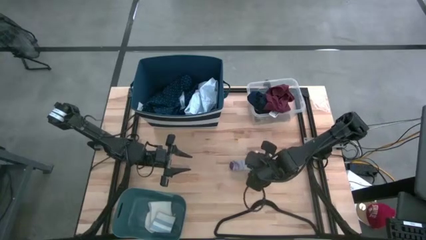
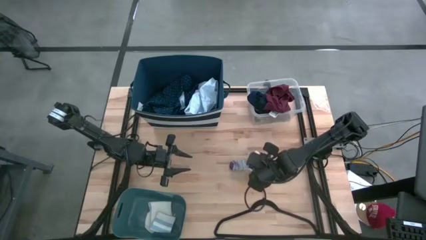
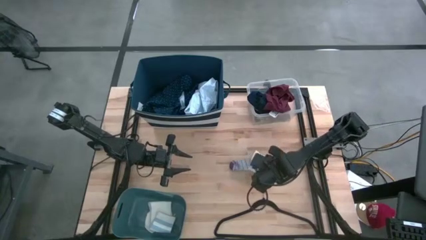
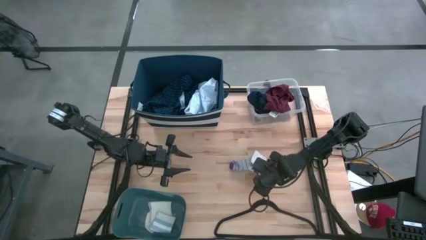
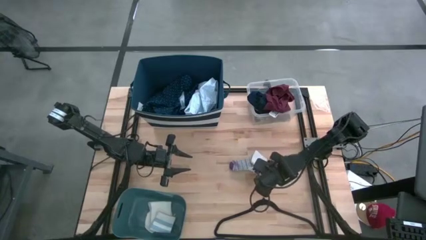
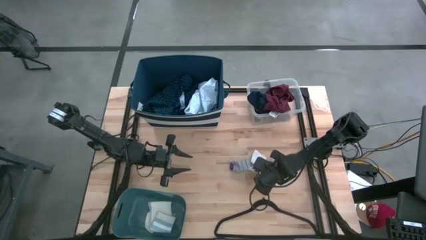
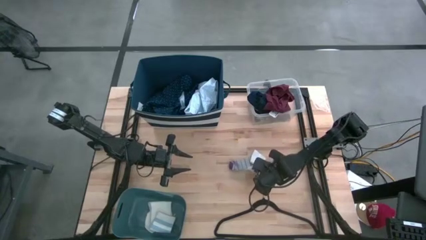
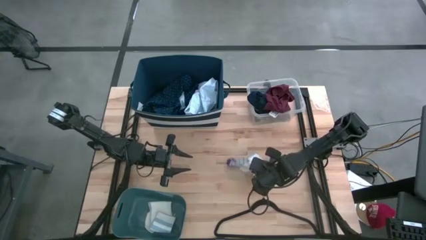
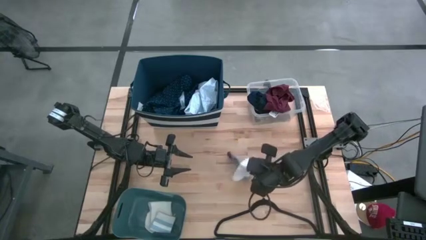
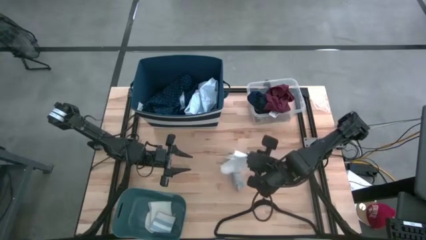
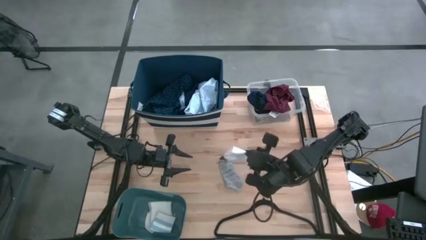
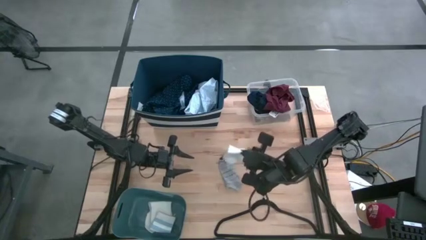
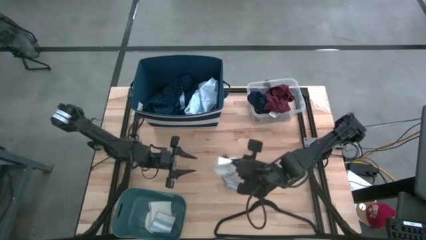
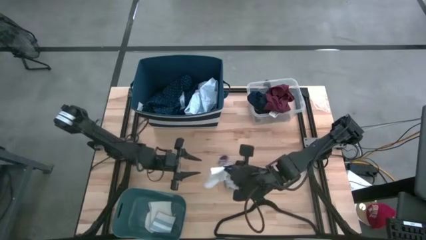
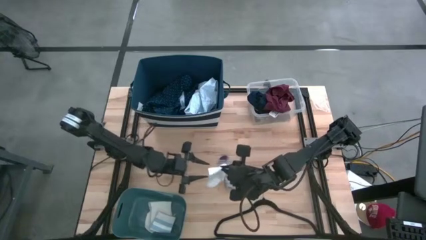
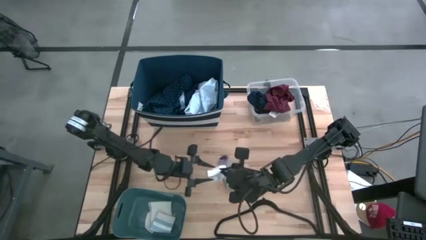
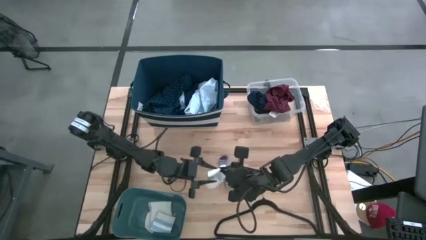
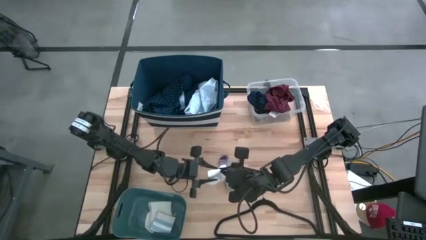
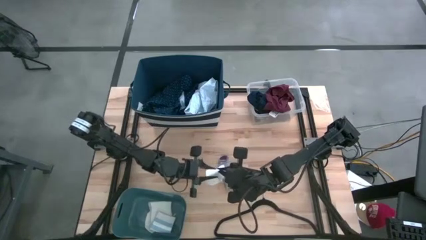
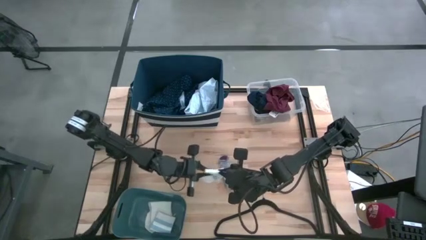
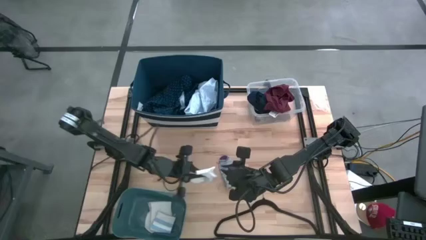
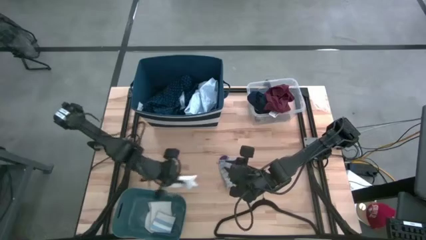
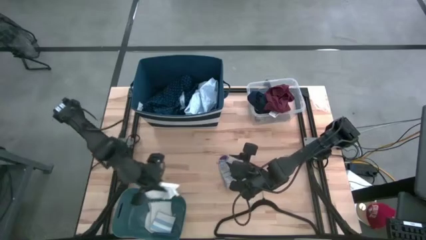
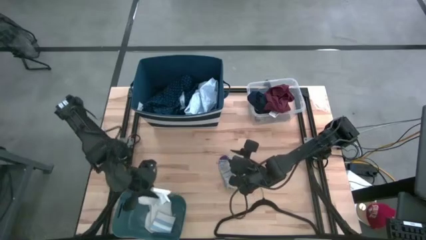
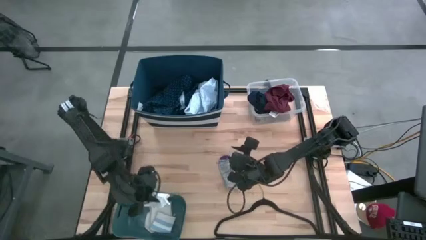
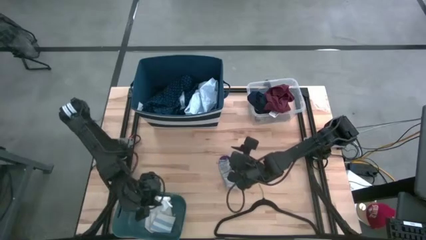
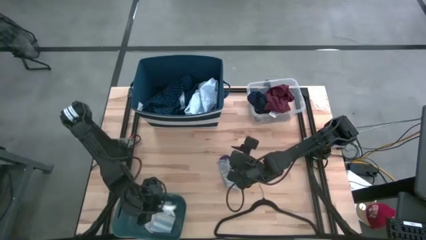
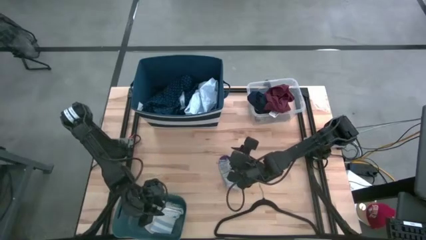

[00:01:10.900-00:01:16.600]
Task: Pick & Place Cloths
Put the white sock into the blue bin

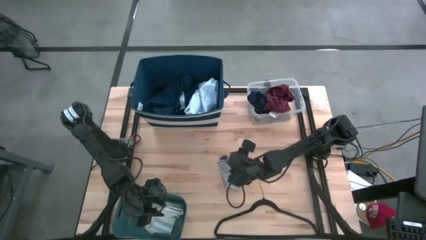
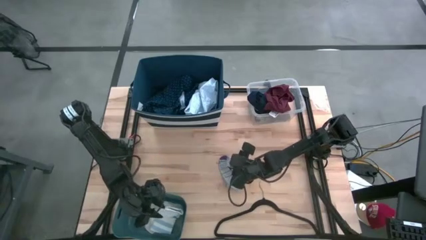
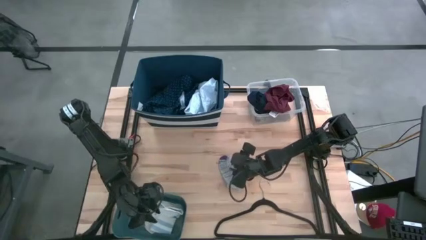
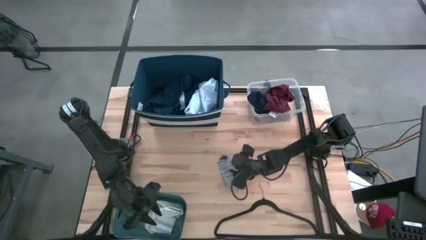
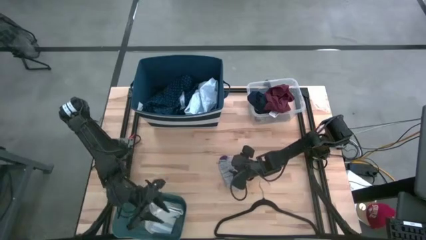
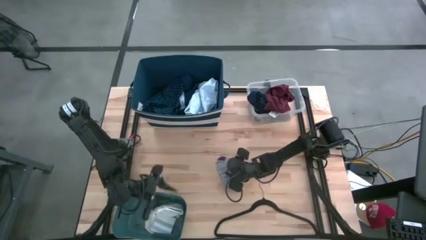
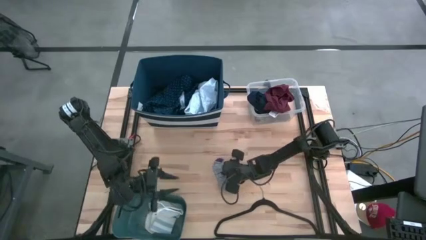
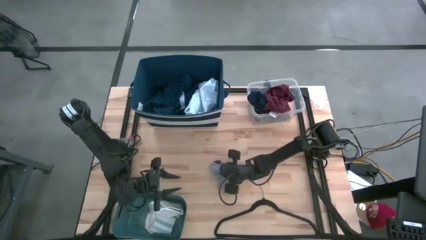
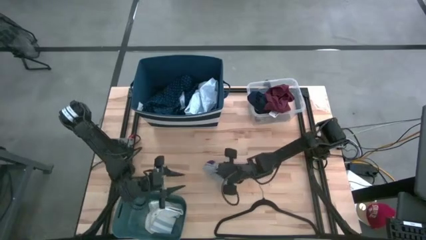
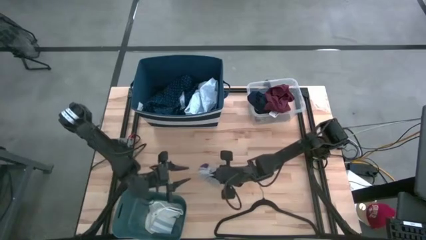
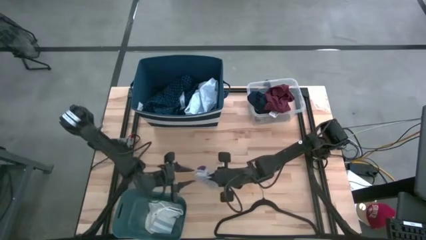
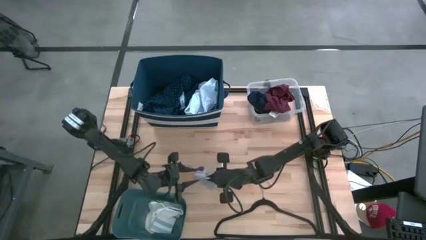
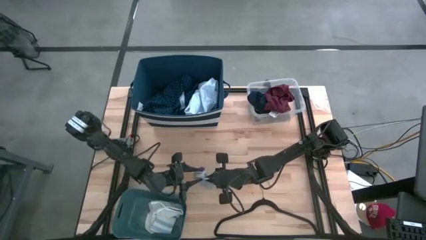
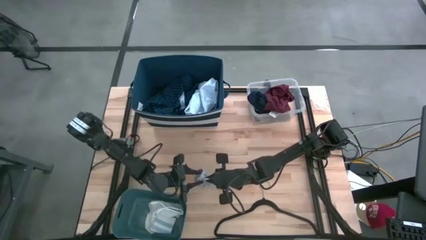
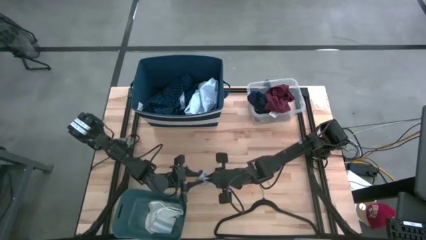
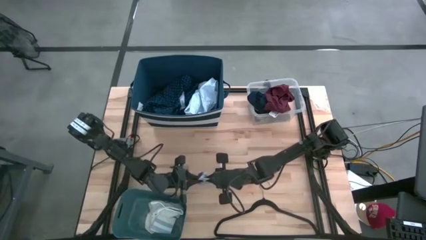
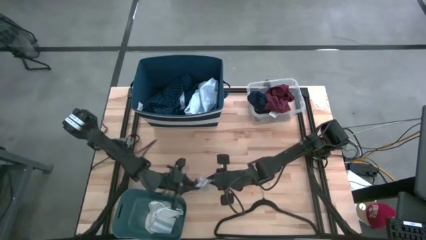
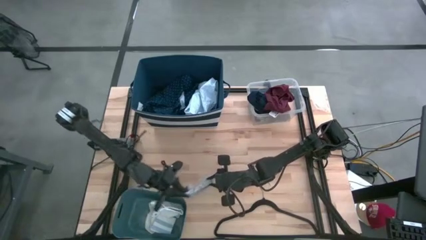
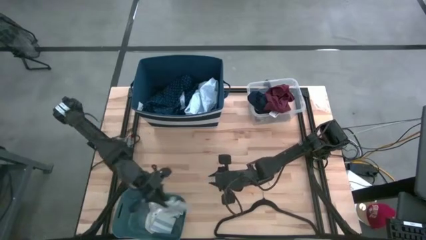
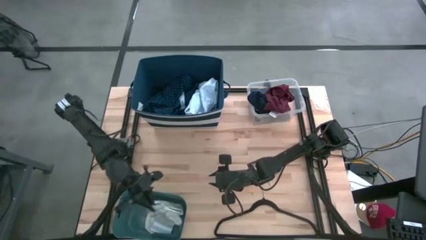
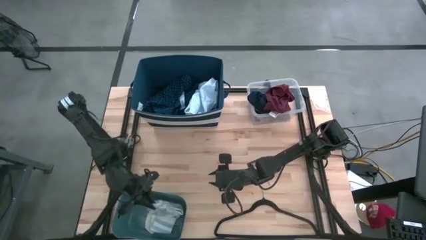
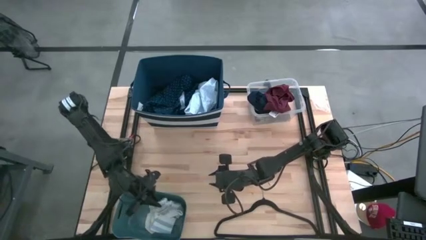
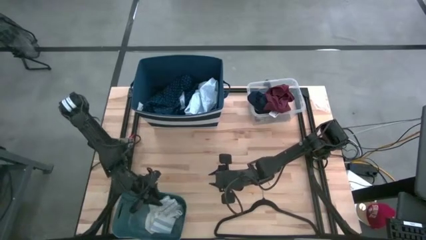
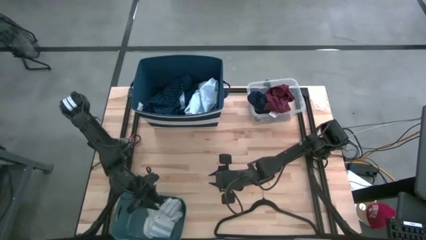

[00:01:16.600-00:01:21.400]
Put the gray sock into the blue bin

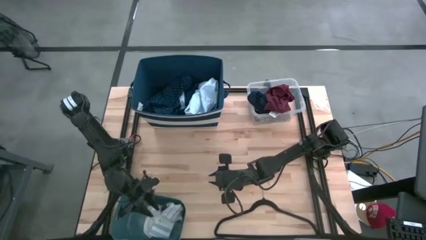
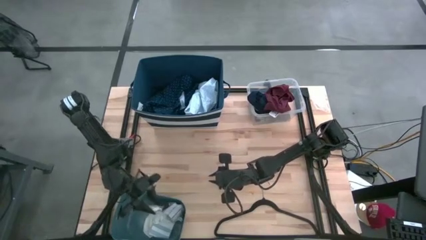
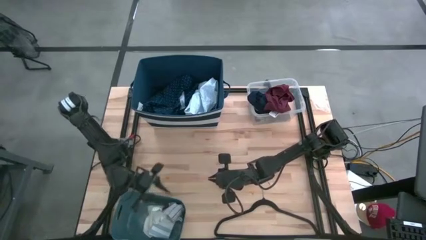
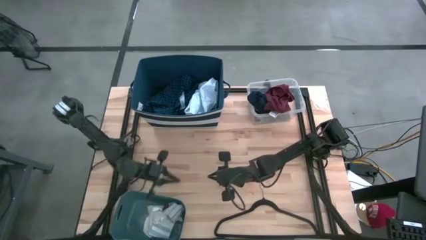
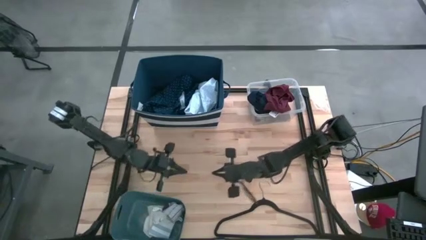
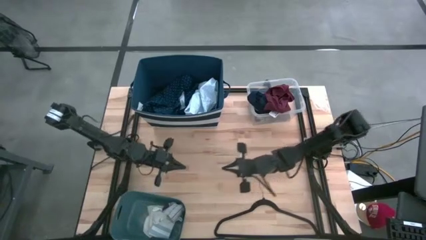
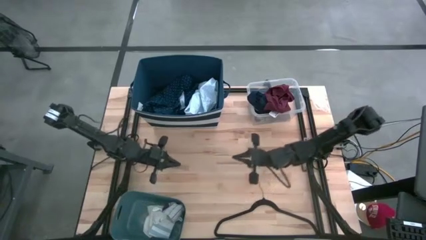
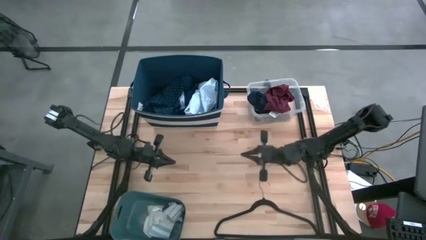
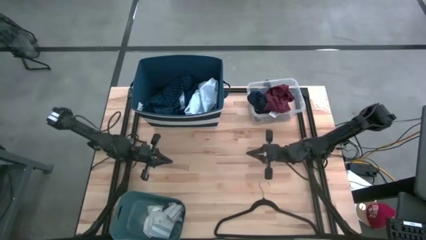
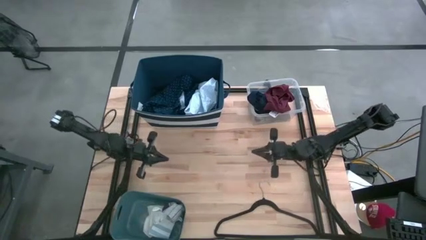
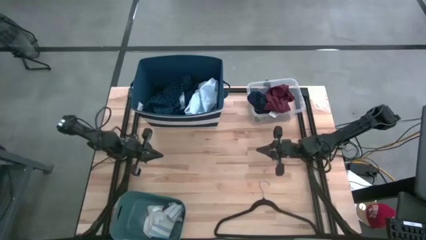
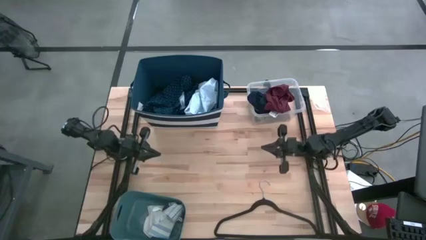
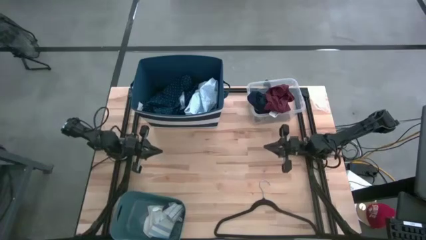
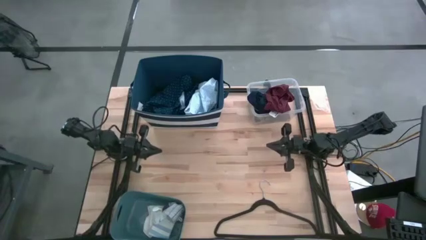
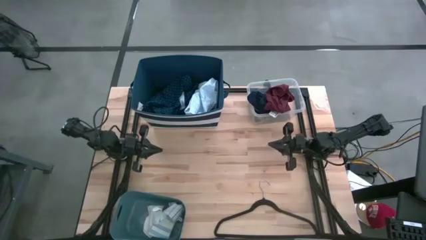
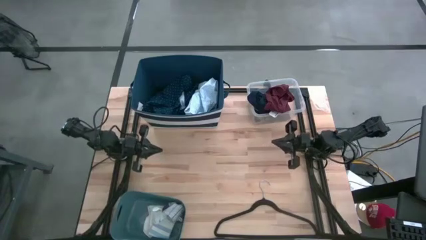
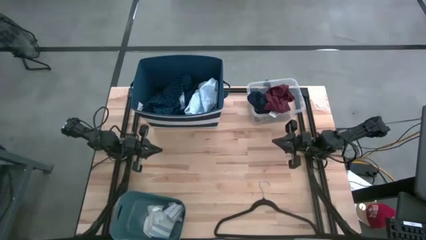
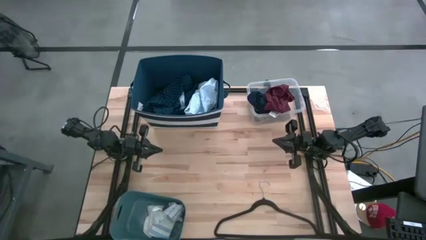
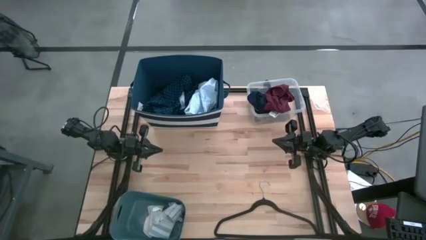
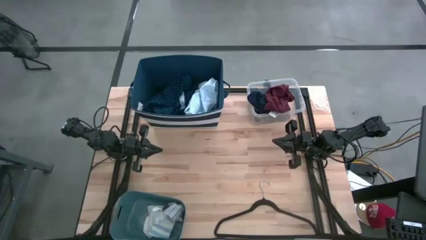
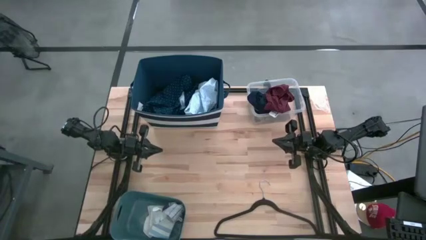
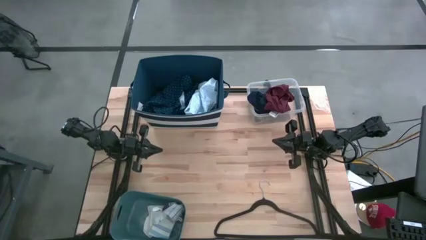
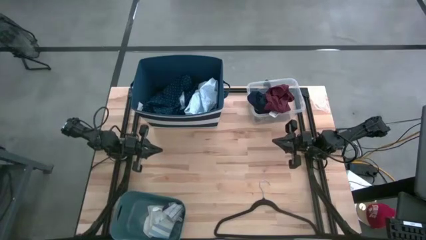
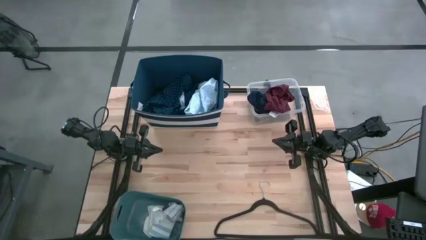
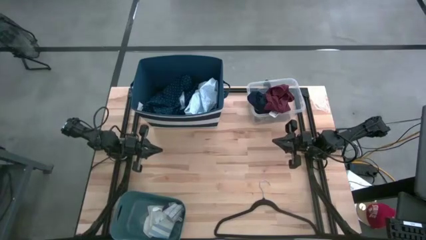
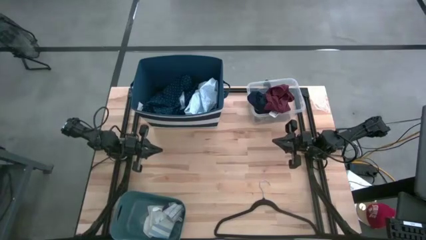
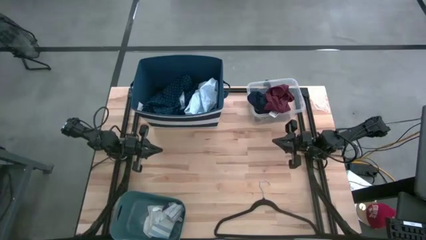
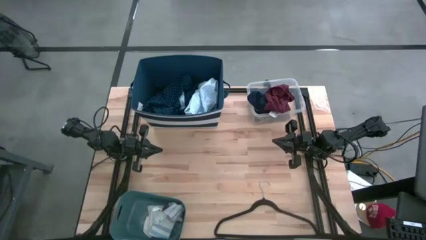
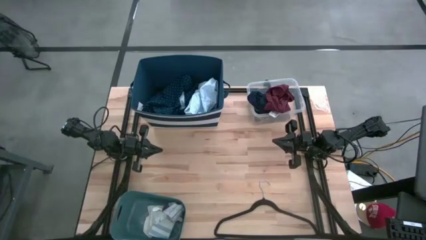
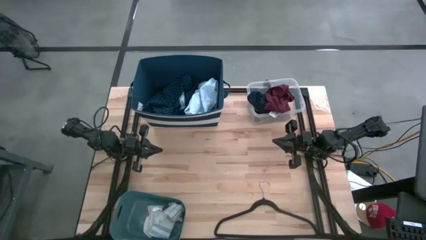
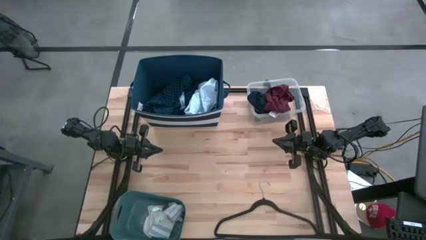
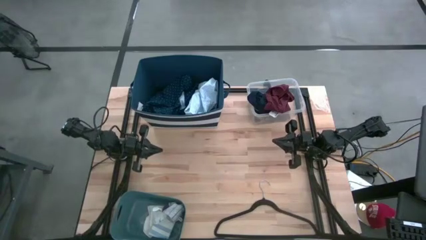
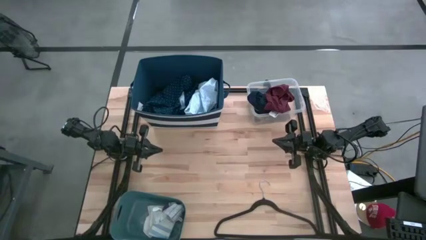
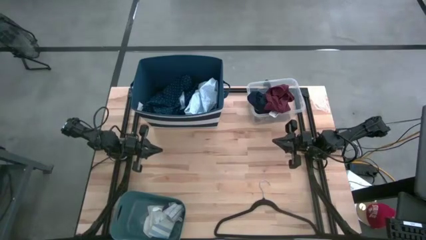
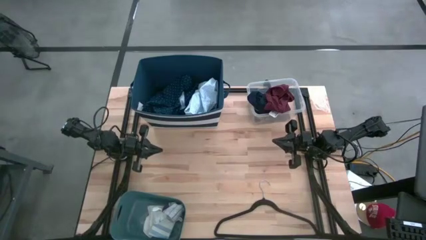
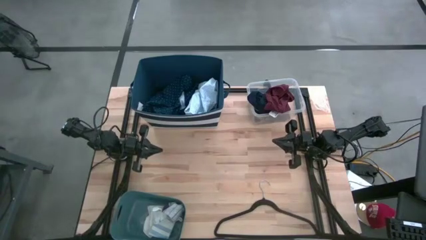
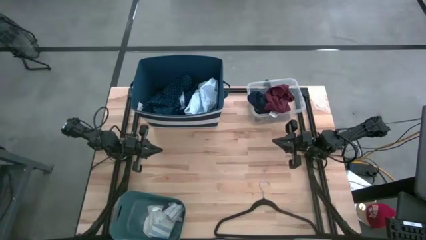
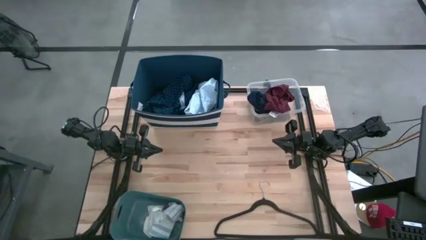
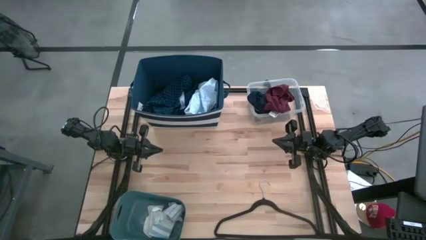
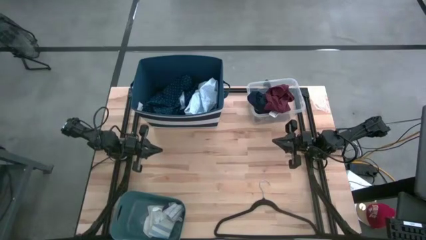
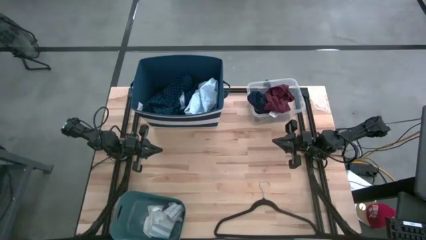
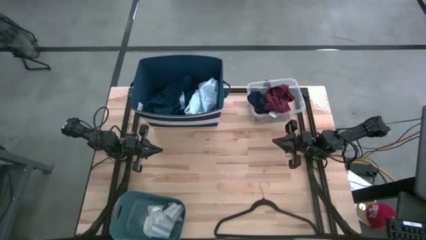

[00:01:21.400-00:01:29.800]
Return to Home Position
